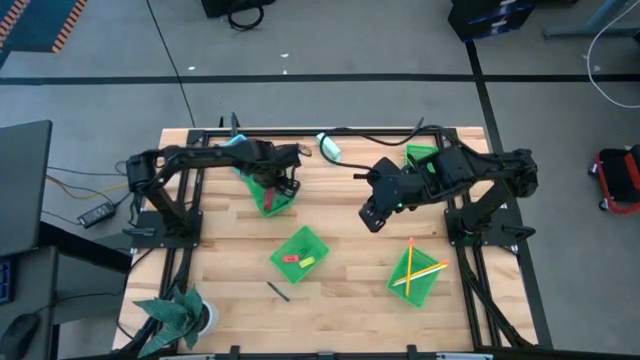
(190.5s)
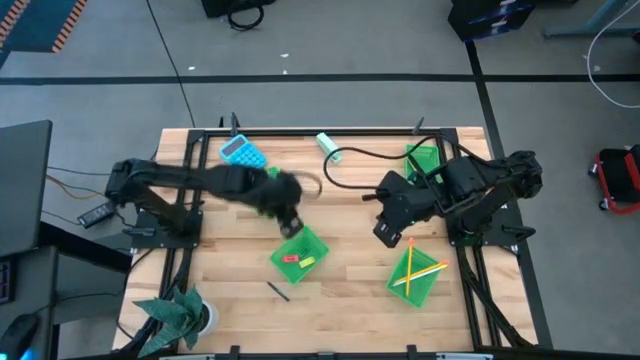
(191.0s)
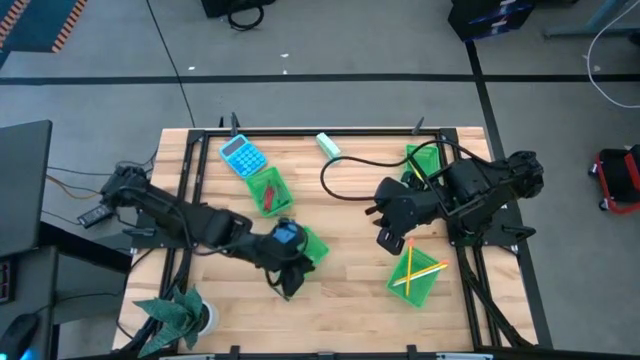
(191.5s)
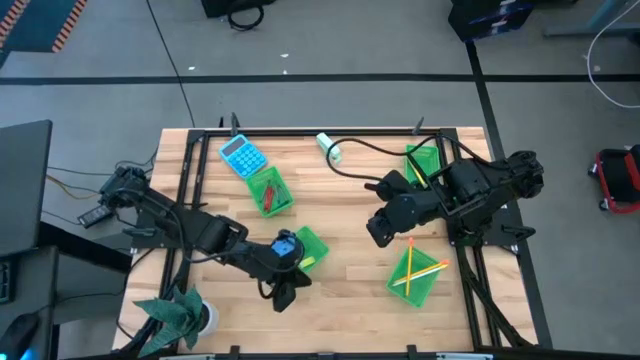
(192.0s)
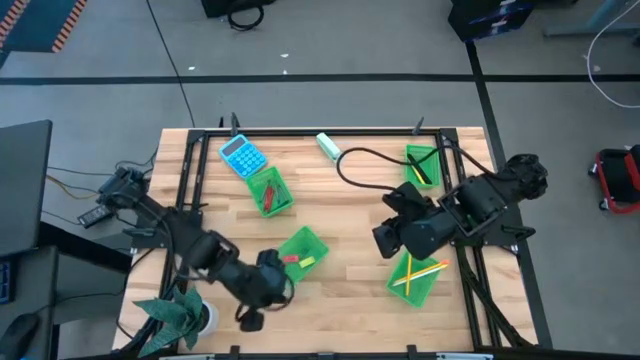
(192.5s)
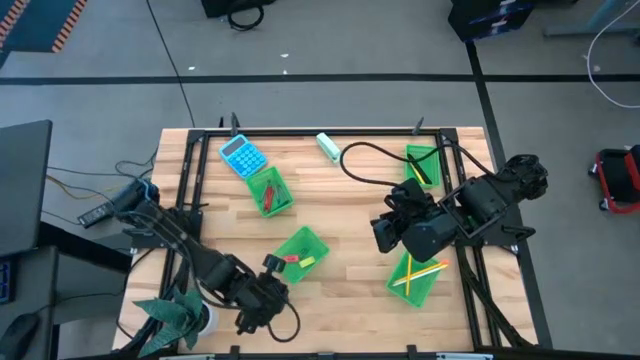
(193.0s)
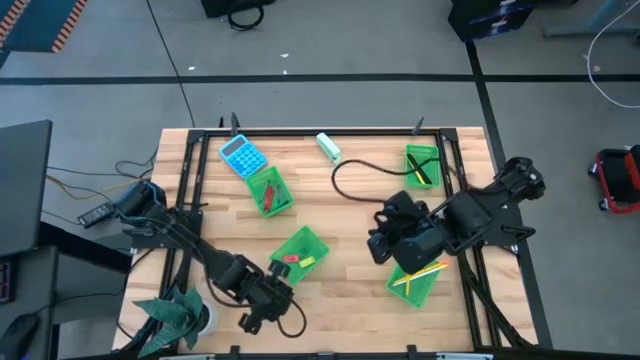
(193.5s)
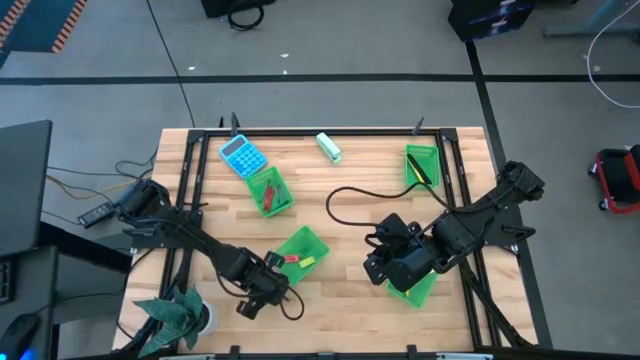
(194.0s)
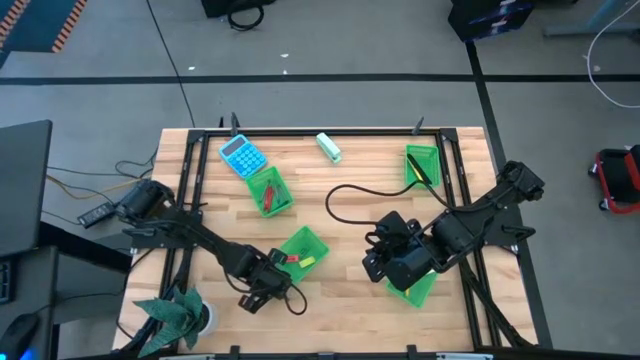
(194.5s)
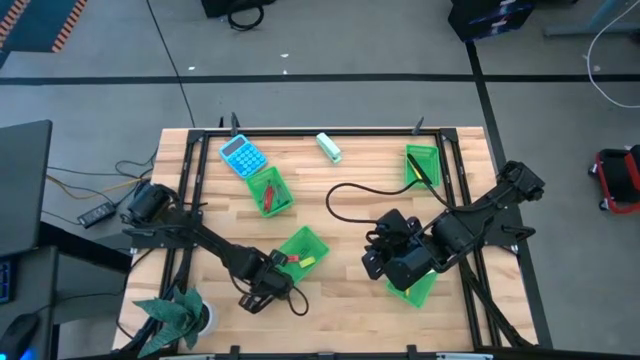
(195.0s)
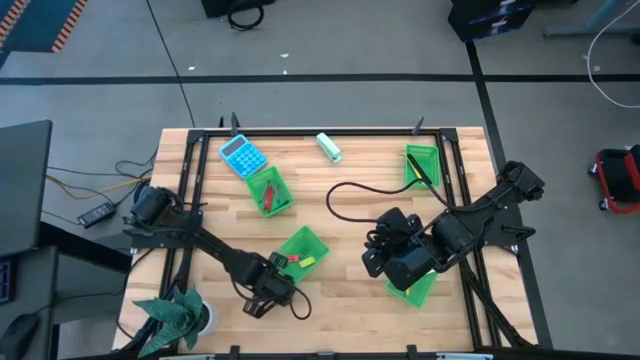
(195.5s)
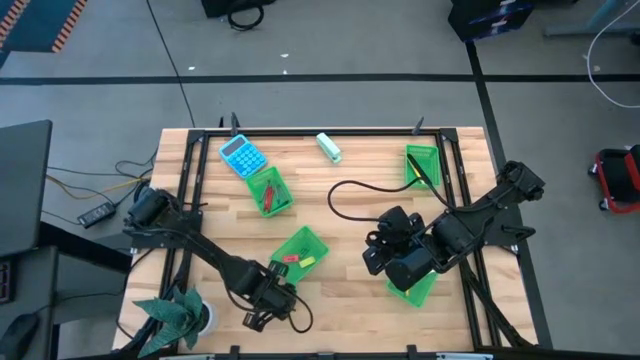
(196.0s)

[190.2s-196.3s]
Task: Sort crayons/erasers/pens/pencils in bins
Put the green crayon into the top left green bin

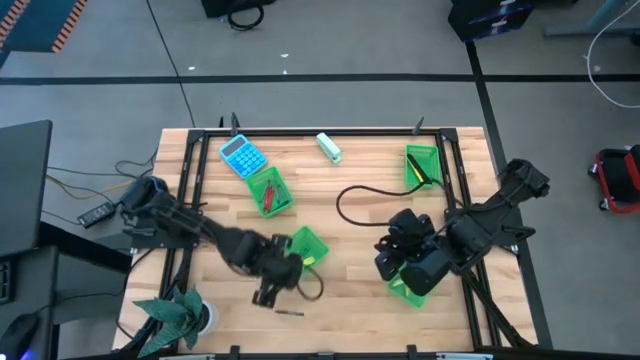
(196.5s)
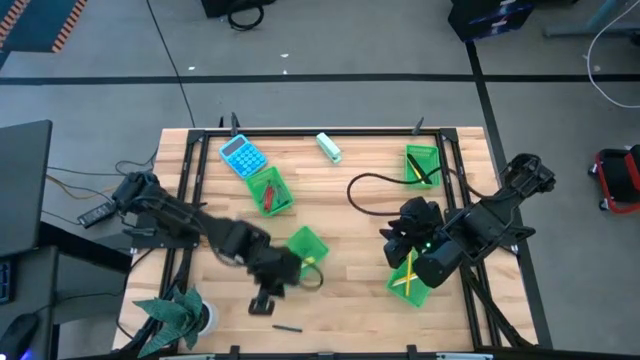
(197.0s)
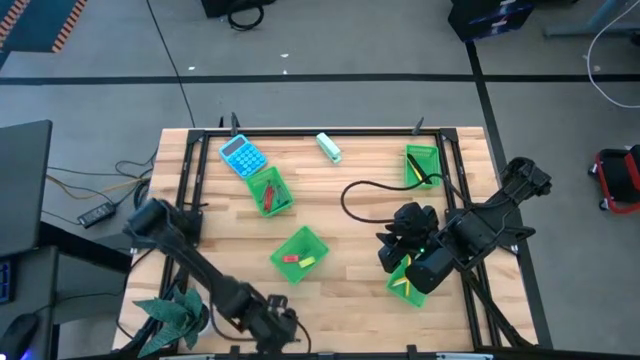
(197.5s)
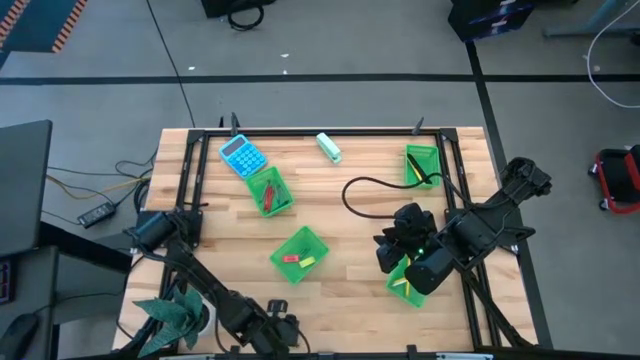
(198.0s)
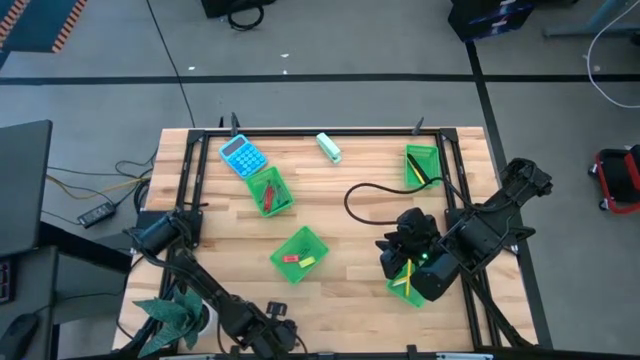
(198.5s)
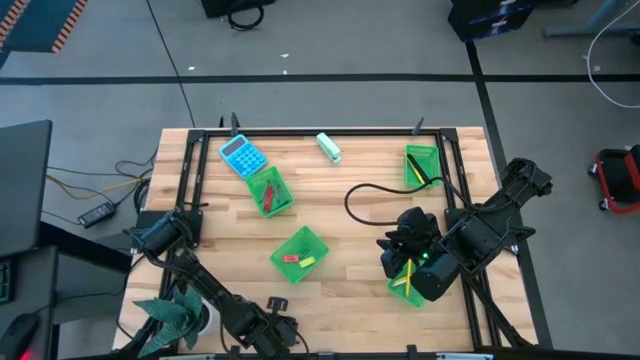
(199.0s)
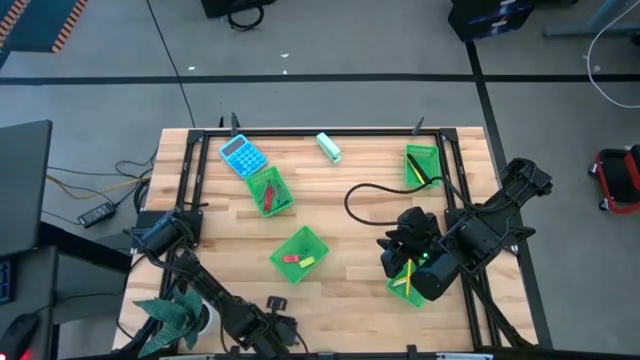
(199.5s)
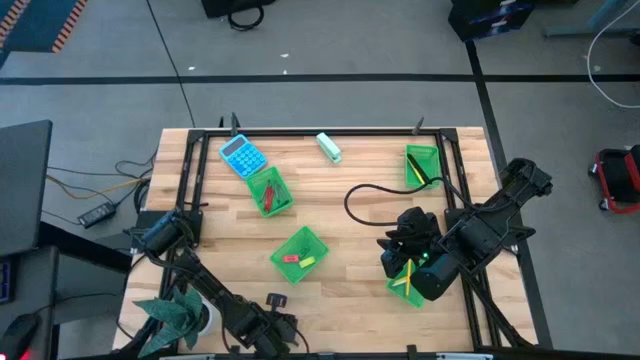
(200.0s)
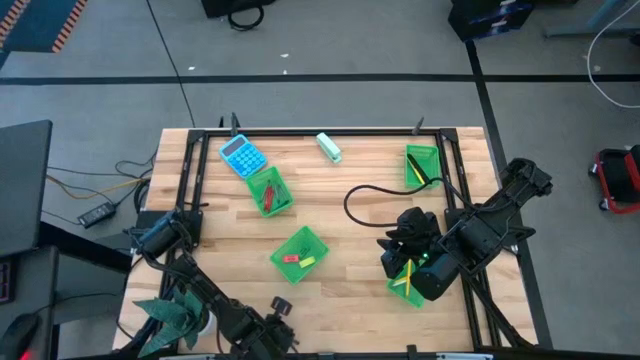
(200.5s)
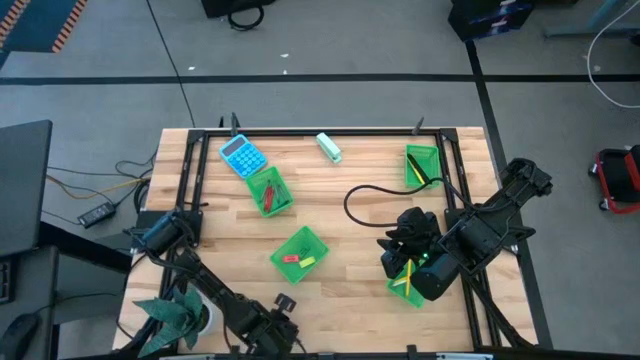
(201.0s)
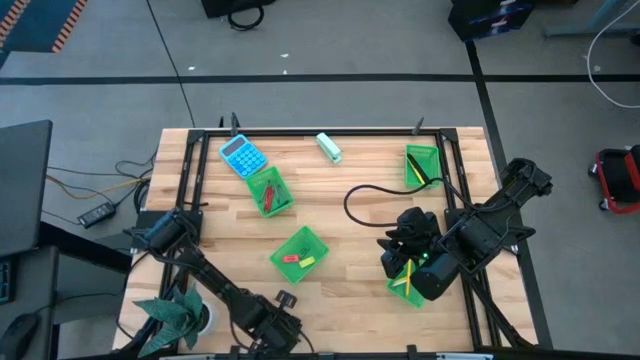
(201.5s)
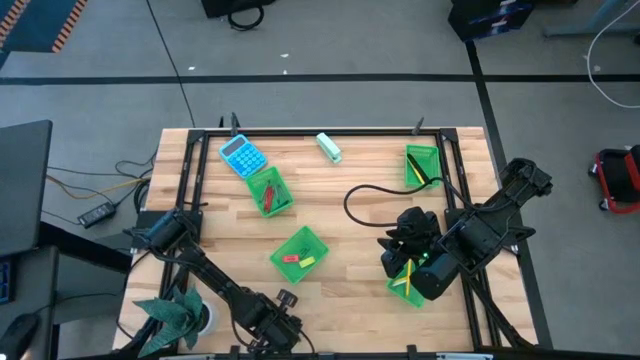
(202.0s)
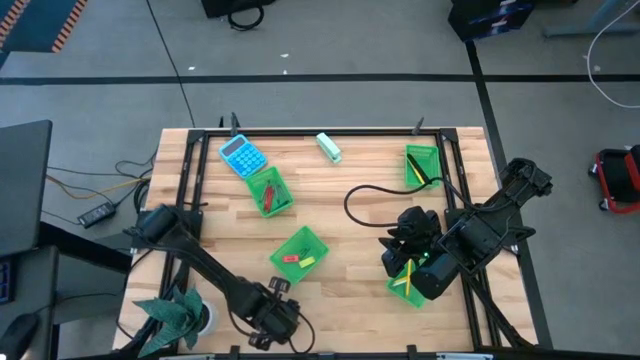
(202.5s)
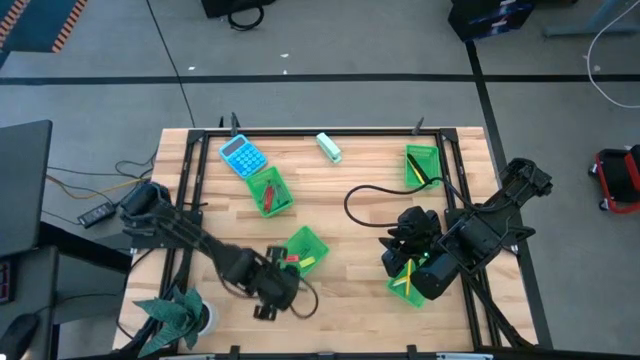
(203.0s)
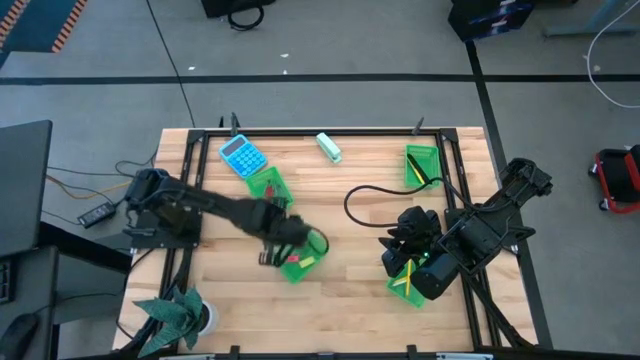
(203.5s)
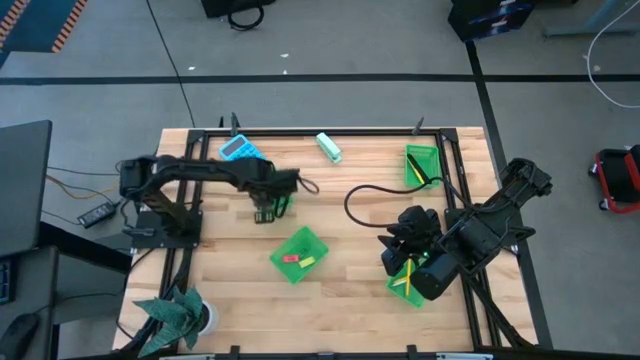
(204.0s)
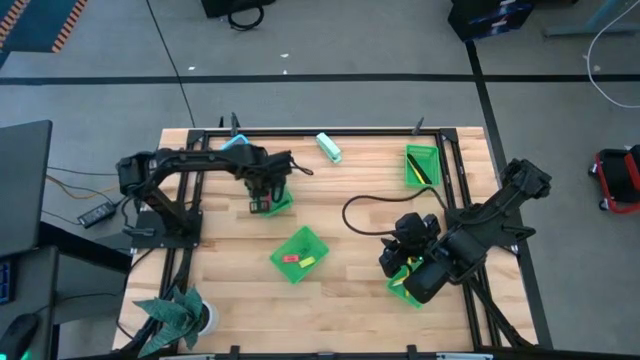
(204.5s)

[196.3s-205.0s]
Put the green crayon into the top left green bin

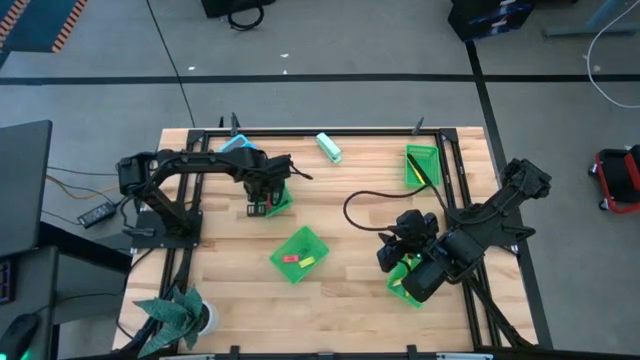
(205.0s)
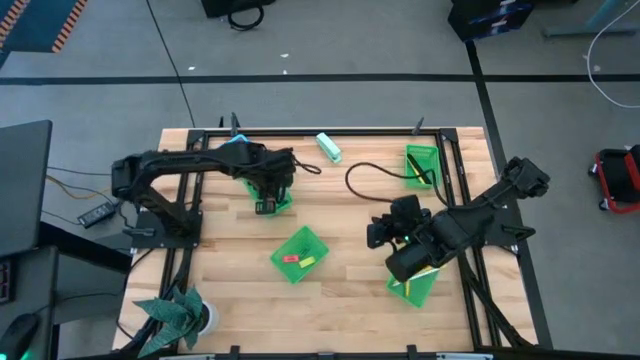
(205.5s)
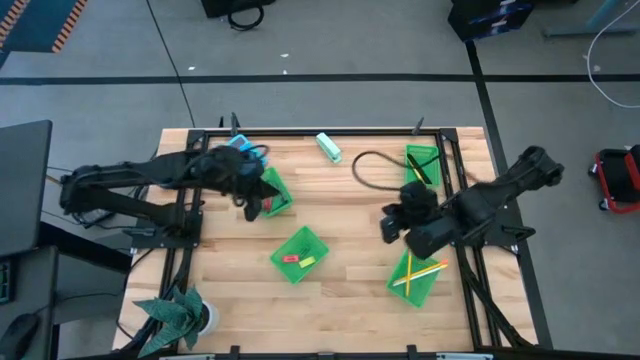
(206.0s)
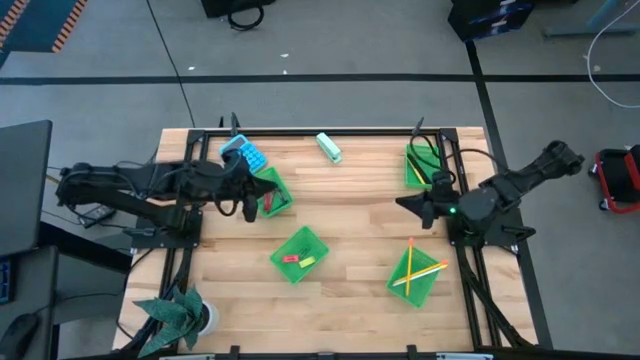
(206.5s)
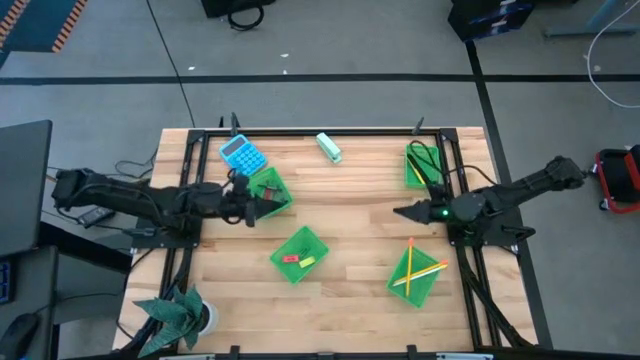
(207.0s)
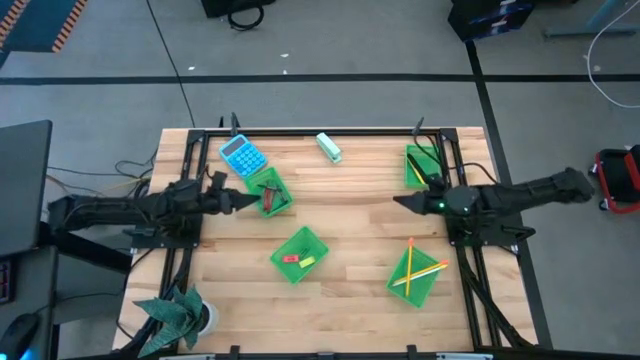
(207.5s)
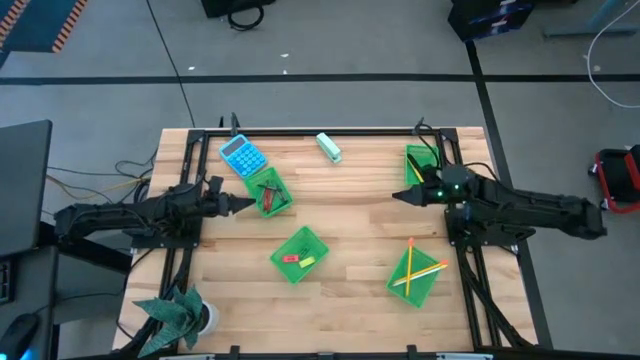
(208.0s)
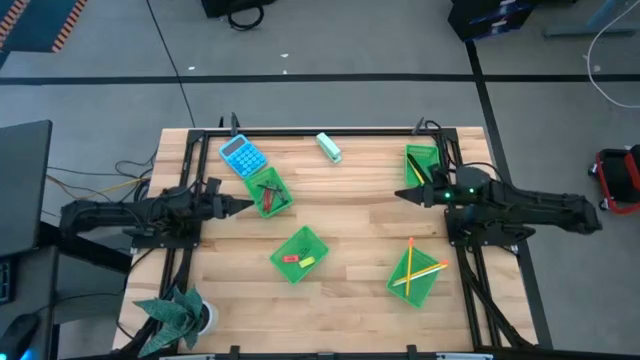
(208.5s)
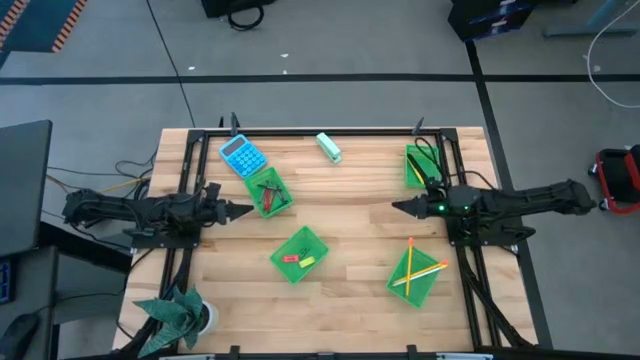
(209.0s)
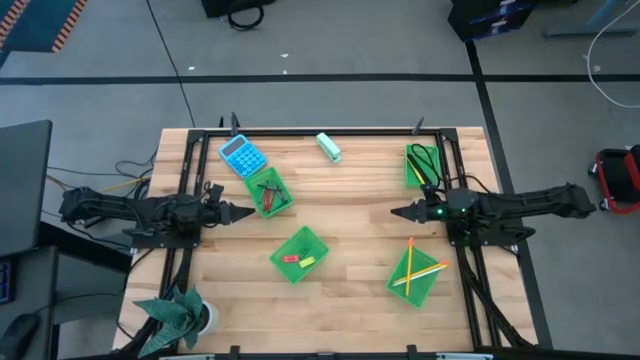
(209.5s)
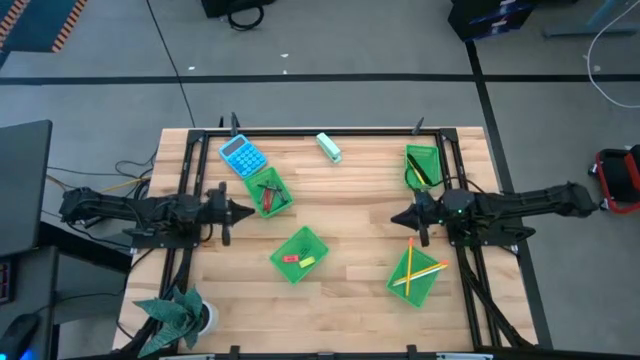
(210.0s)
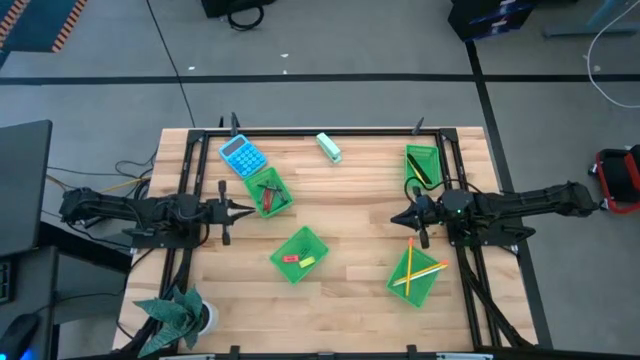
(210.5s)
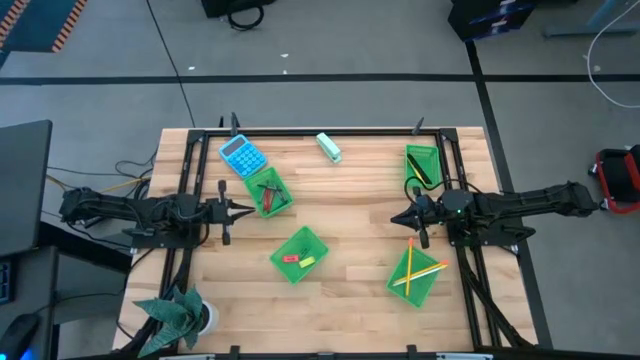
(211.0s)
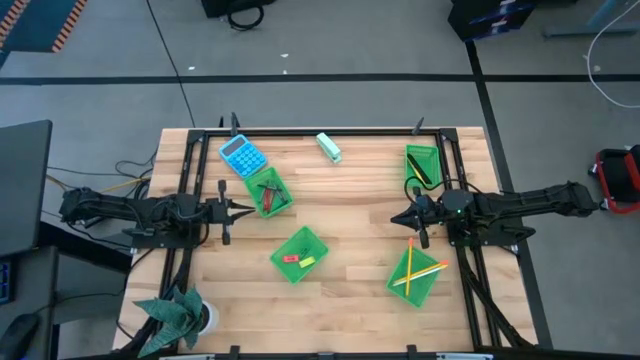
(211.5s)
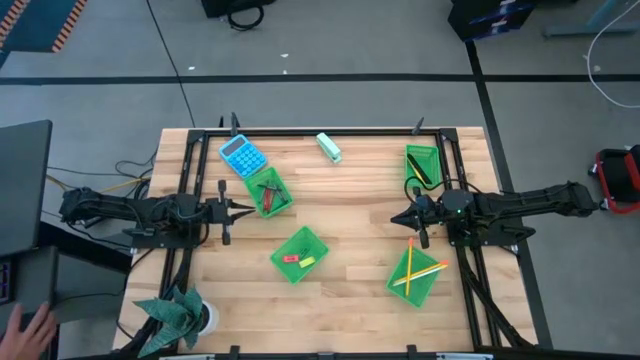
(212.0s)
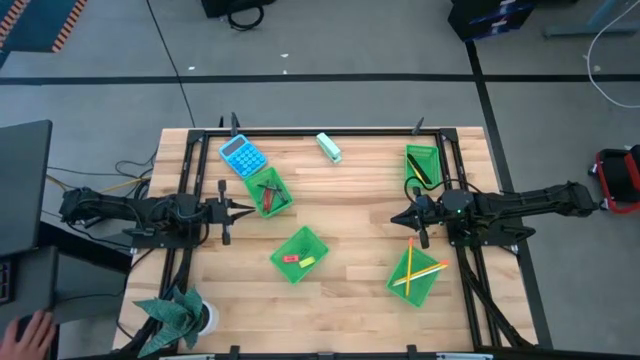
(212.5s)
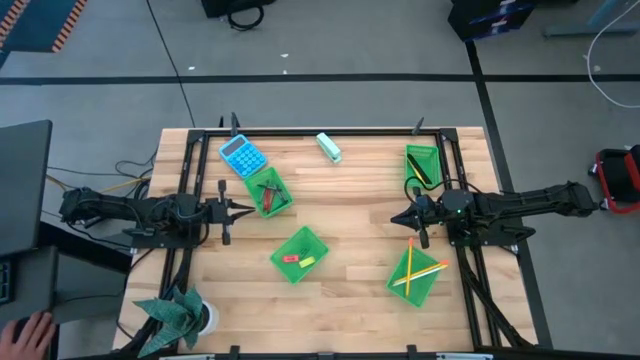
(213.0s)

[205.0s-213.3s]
Return to Home Position
